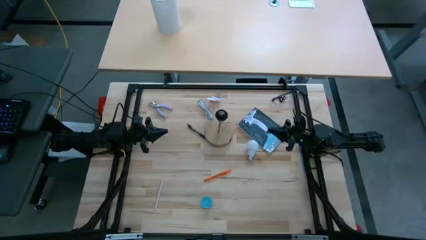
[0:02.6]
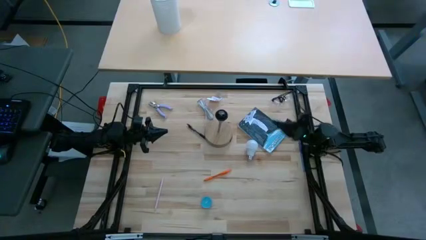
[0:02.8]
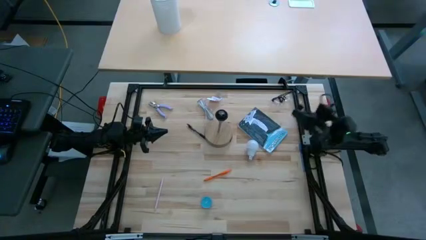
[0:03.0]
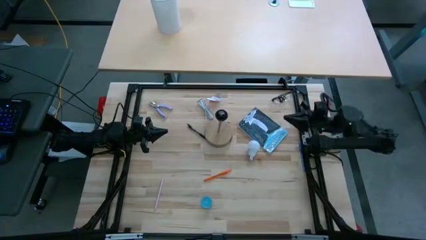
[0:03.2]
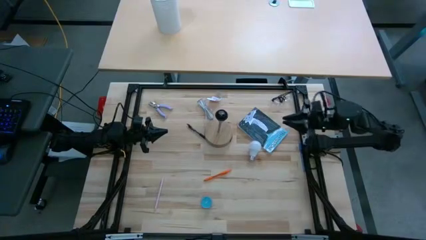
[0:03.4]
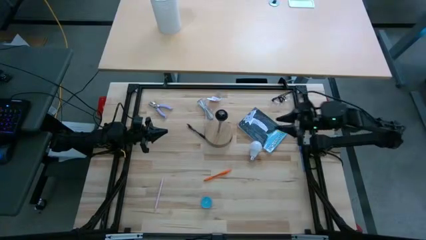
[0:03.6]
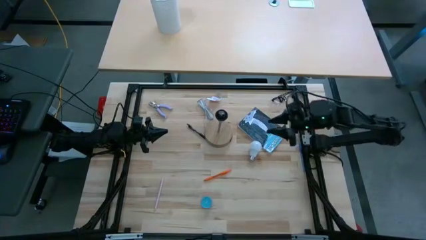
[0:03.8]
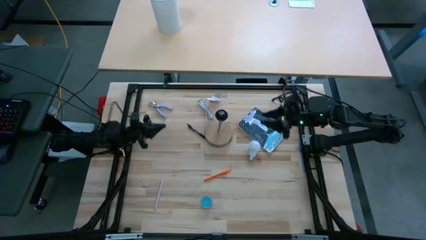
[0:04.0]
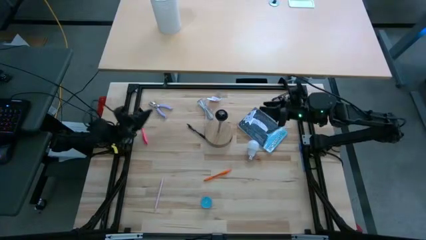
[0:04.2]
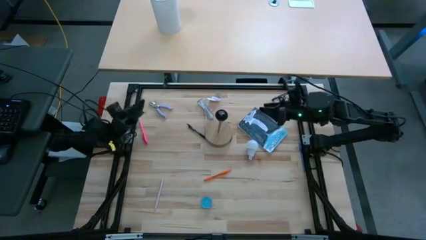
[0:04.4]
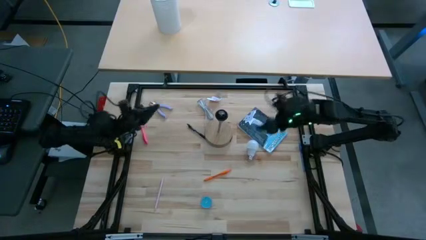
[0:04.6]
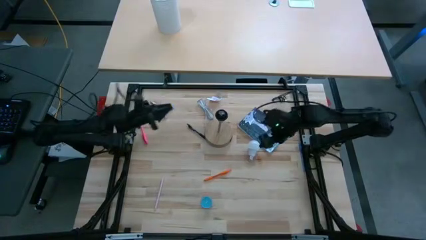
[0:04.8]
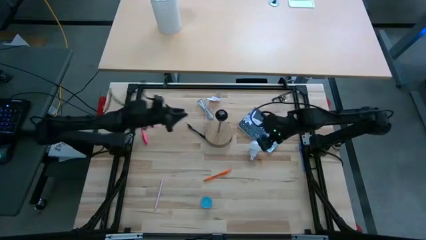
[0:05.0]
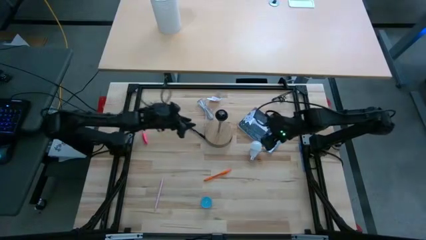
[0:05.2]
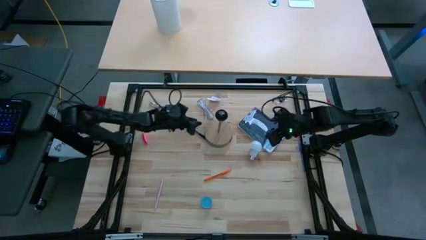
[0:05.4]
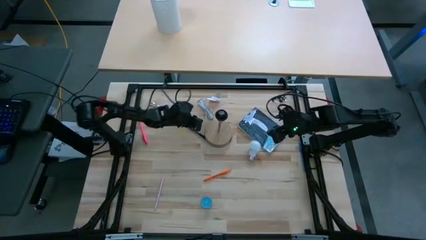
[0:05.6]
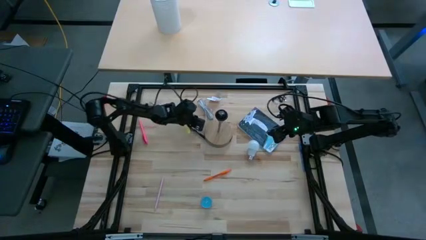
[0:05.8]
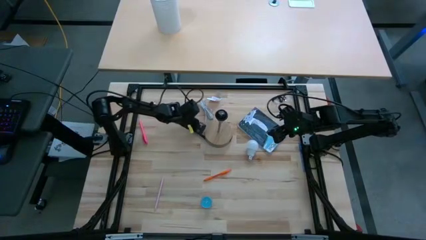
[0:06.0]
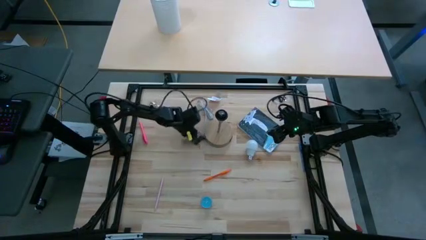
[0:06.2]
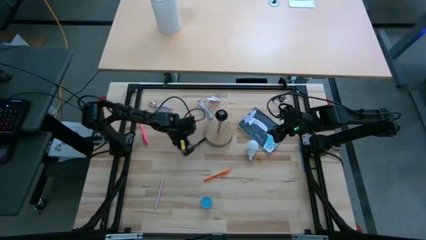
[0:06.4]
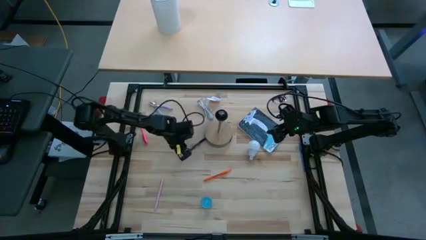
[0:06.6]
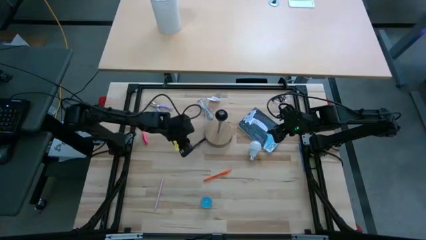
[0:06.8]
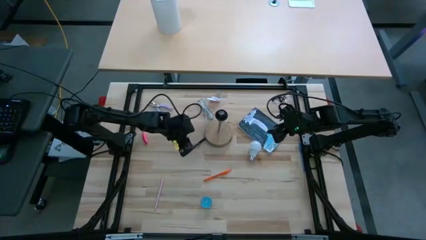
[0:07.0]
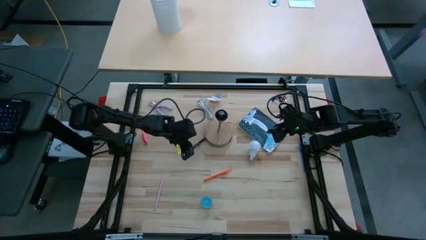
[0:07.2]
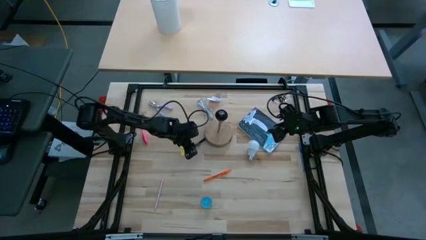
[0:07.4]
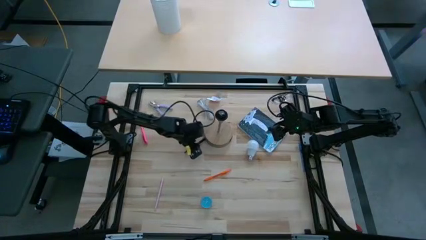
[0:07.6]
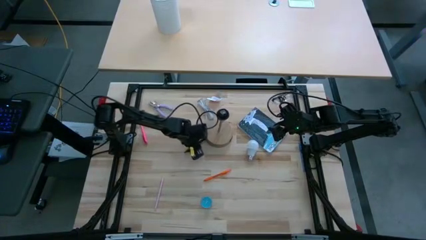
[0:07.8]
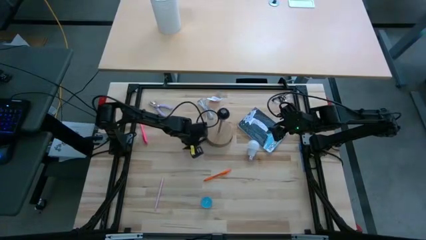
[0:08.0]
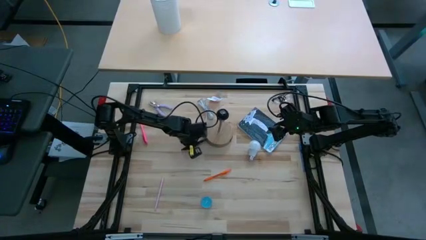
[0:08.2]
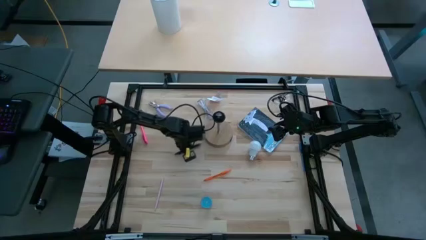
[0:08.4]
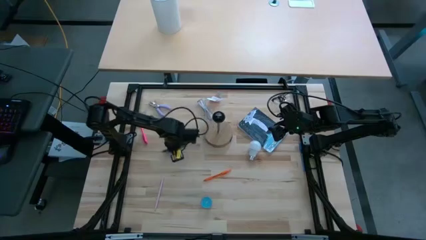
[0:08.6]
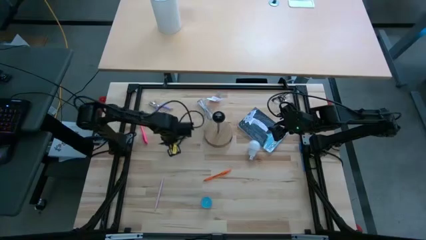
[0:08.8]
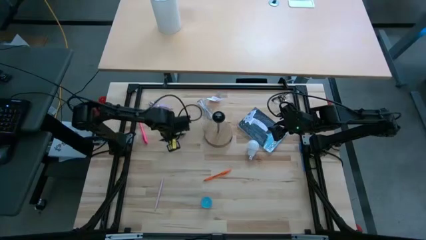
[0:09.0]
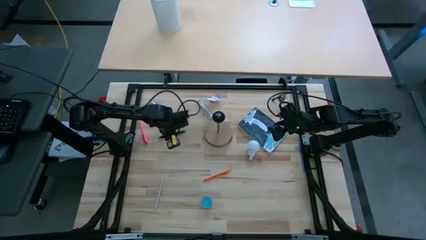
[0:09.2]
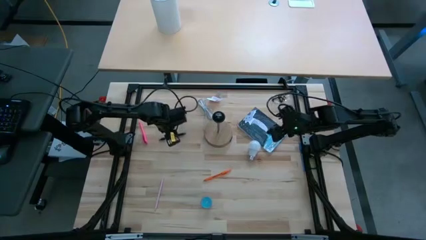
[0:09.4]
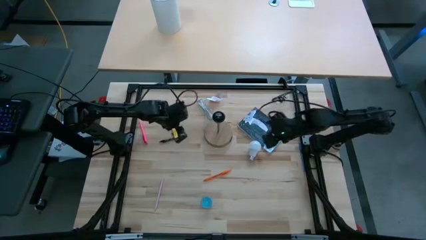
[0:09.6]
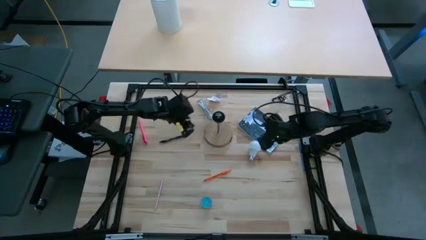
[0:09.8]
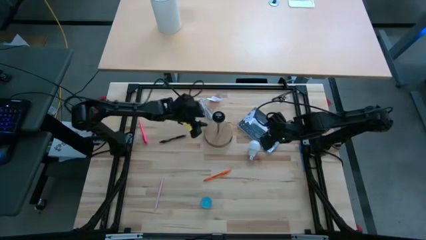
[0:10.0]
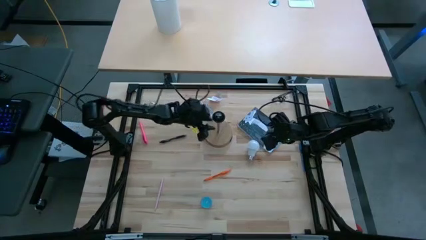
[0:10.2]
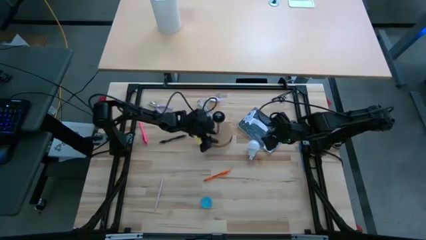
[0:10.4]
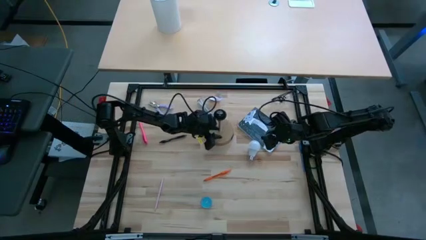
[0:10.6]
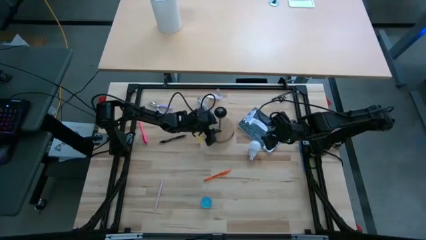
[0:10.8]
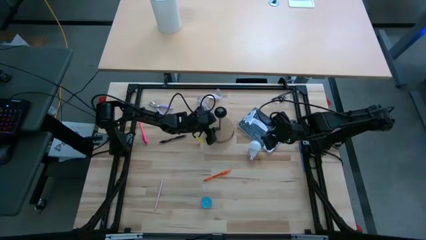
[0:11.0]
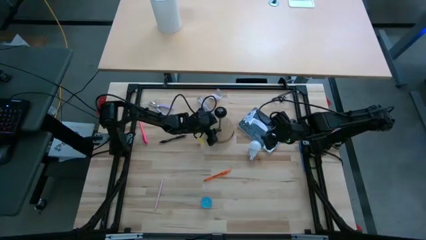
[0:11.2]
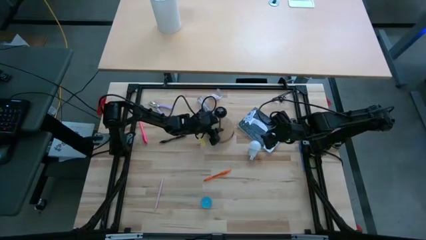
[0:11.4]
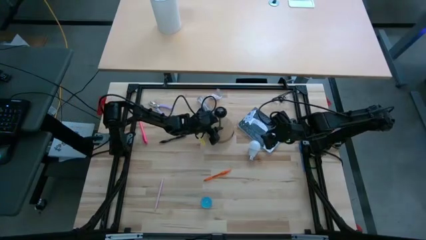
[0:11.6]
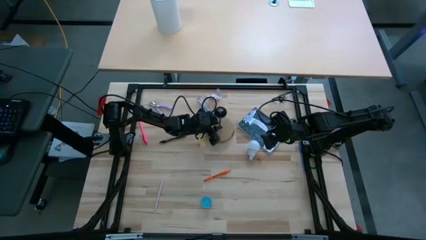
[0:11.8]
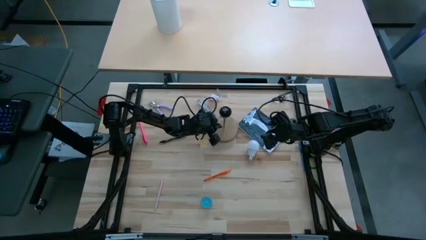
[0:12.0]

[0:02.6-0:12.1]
Task: Screw lightbulb
Move the wooden lamp to the center of the table

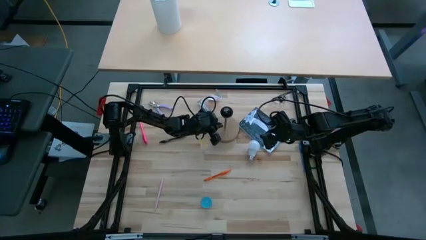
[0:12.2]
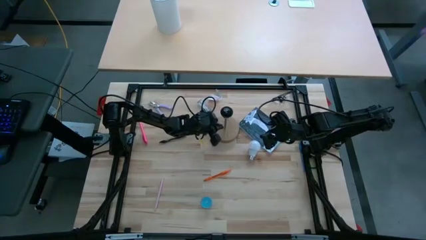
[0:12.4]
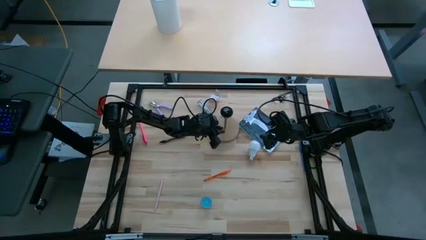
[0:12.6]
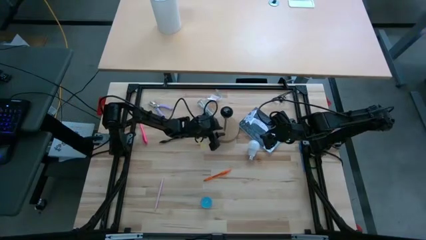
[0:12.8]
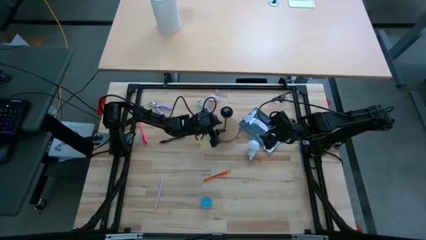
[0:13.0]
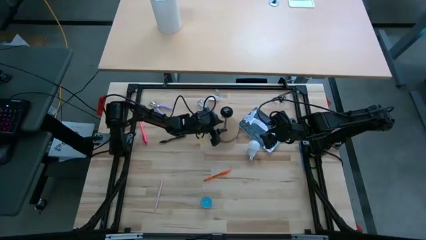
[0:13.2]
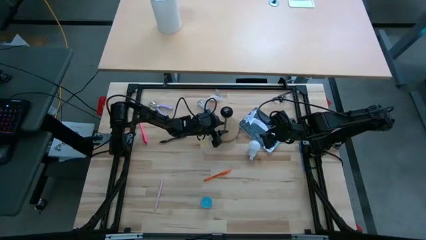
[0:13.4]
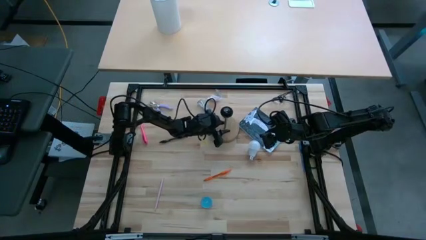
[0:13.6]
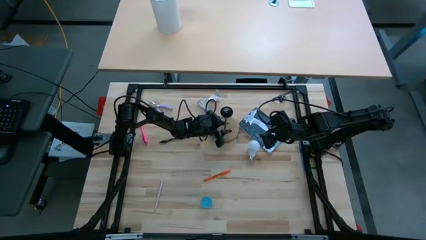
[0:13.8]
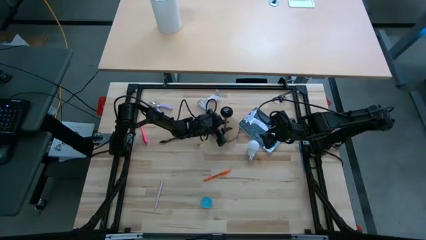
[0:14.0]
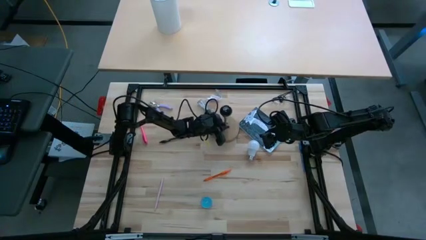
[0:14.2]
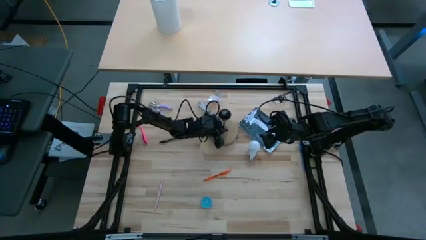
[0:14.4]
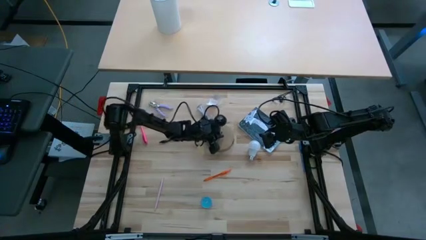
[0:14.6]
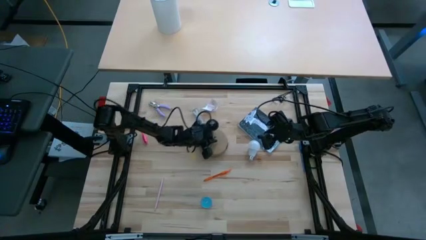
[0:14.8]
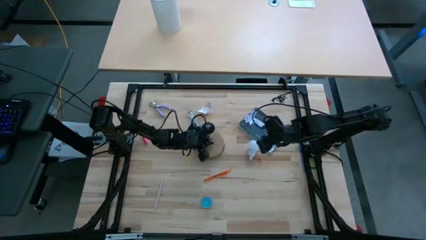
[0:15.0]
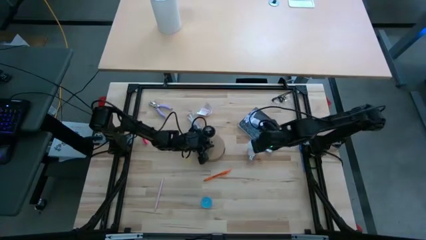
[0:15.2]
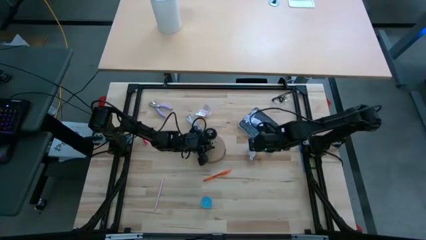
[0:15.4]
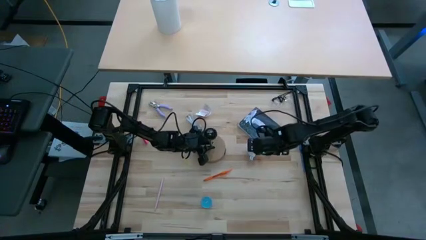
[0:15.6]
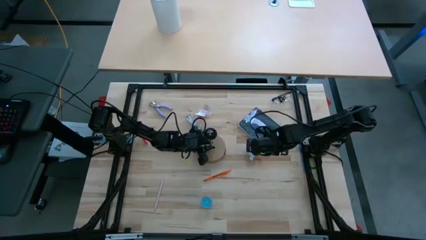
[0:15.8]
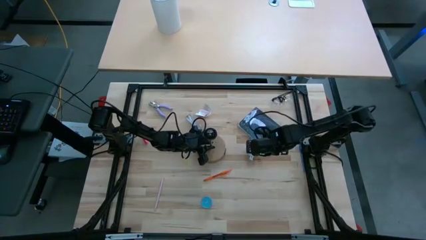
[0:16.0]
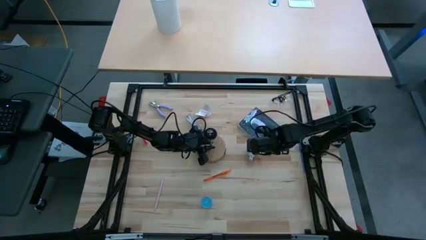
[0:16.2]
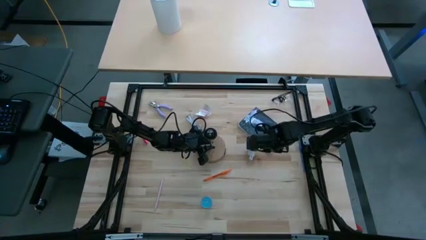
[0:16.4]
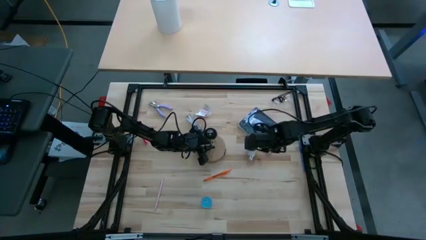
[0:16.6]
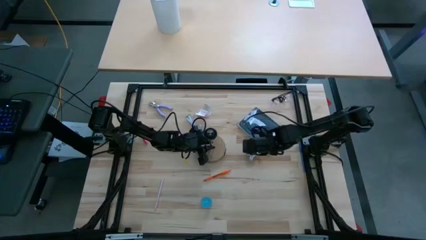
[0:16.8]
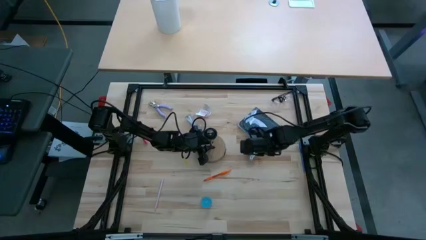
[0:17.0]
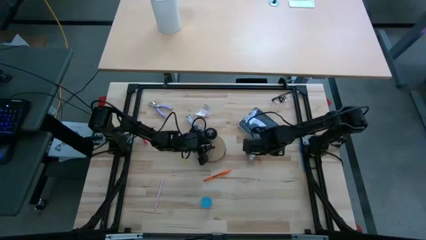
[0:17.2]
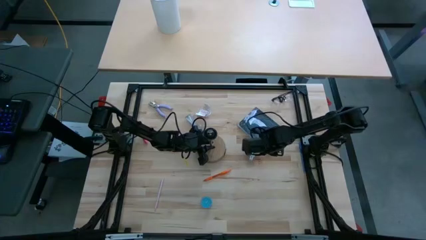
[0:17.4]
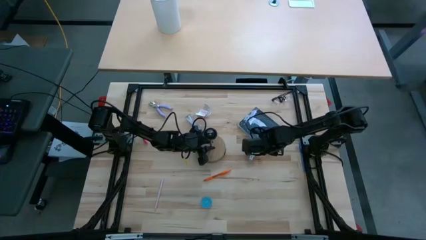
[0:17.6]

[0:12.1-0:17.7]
Move the wooden lamp to the center of the table

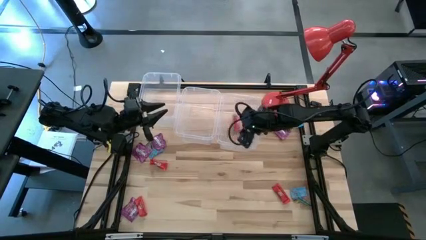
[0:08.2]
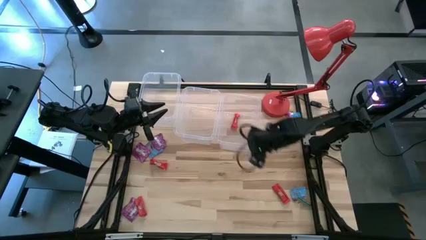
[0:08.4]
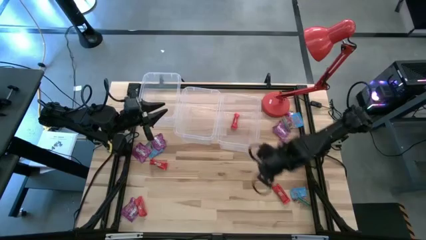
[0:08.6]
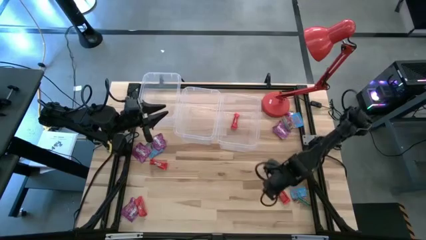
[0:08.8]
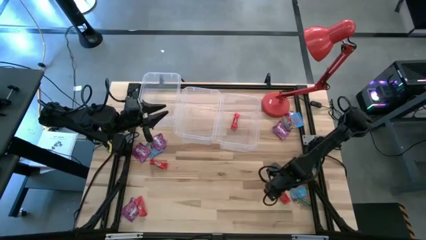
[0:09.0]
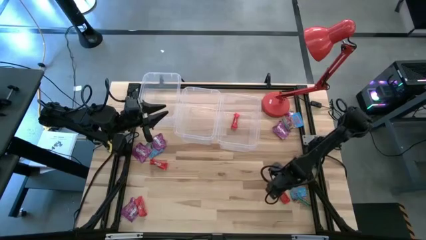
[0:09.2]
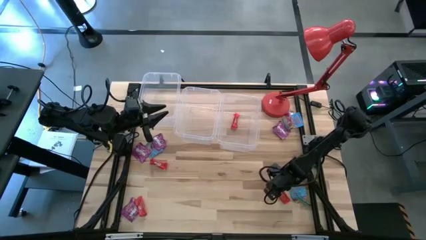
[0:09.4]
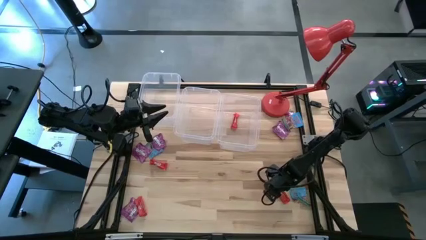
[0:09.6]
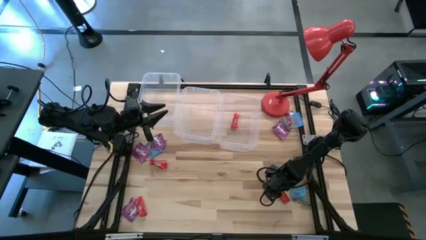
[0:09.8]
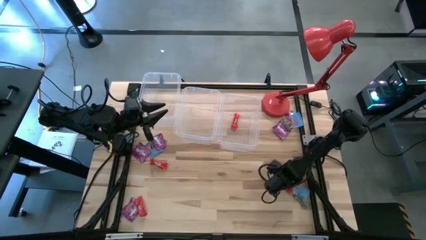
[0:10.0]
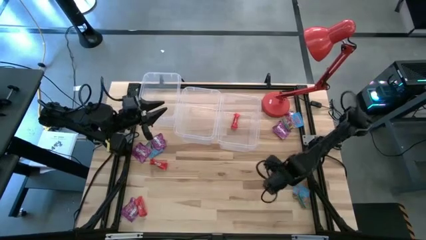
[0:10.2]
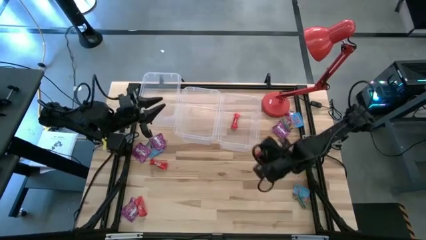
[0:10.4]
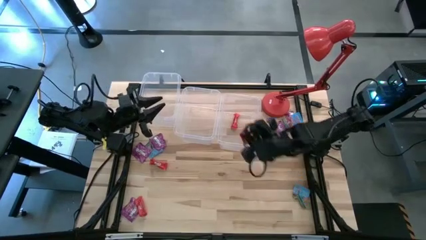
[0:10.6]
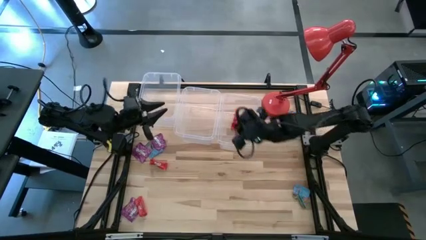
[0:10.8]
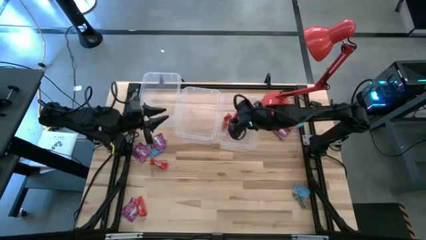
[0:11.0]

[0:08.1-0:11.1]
Task: Sort candy
Put the middle right red candy into the top right transparent bin
